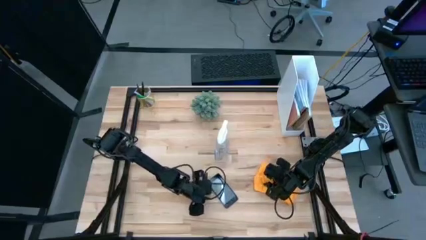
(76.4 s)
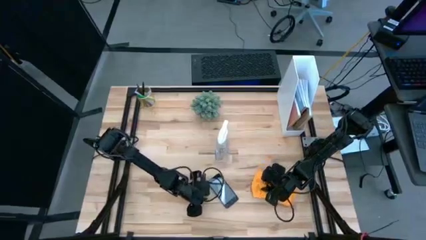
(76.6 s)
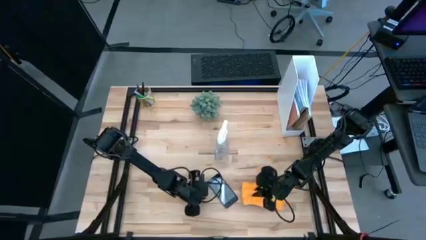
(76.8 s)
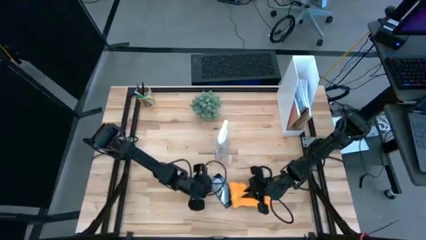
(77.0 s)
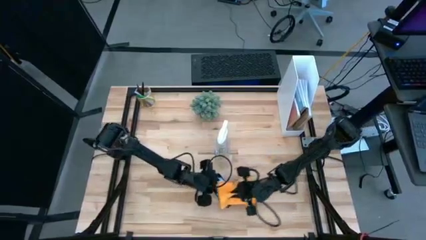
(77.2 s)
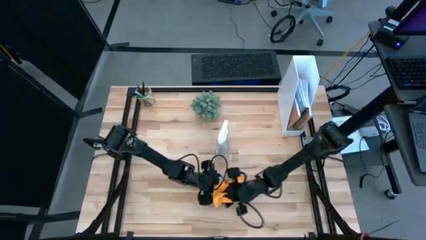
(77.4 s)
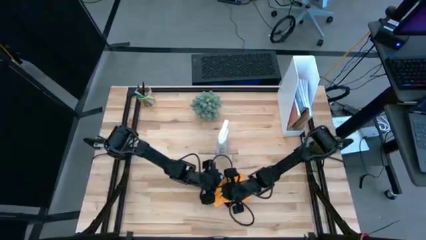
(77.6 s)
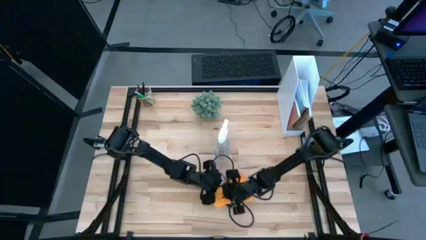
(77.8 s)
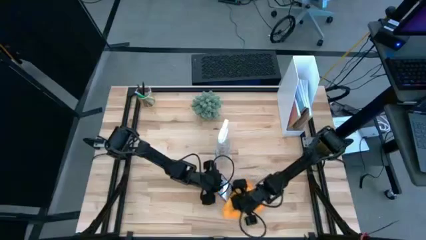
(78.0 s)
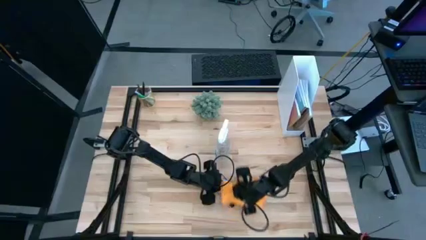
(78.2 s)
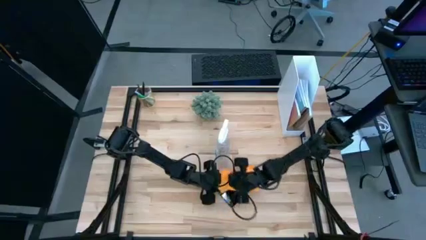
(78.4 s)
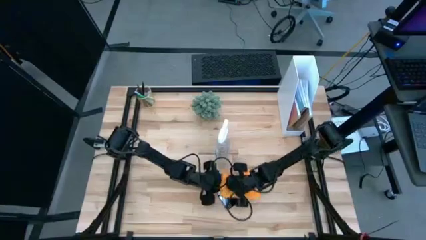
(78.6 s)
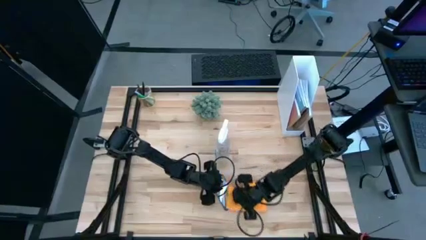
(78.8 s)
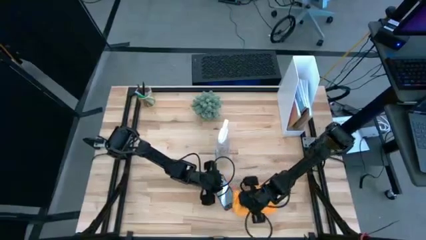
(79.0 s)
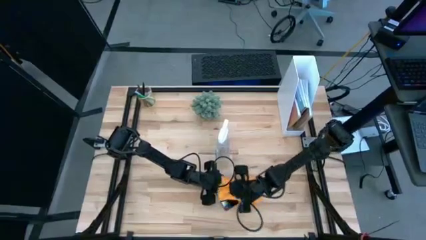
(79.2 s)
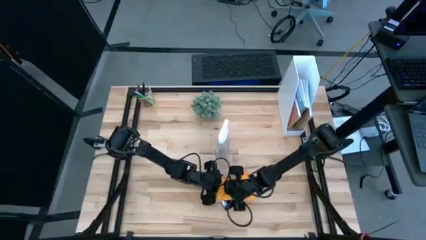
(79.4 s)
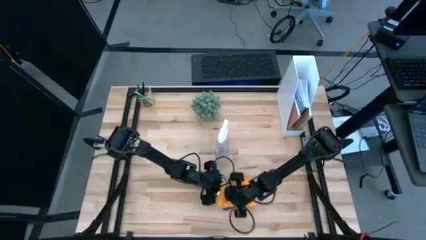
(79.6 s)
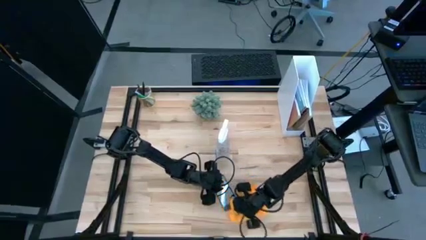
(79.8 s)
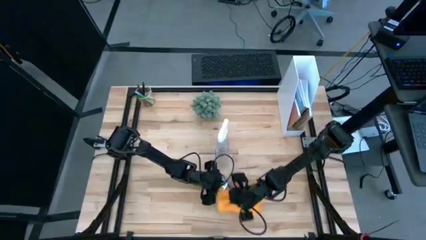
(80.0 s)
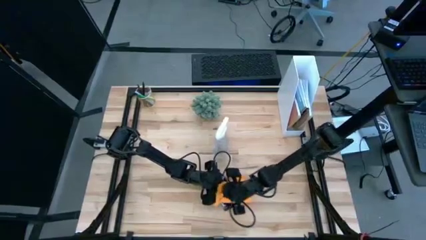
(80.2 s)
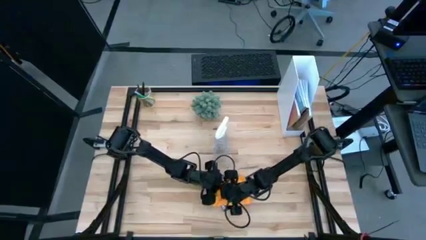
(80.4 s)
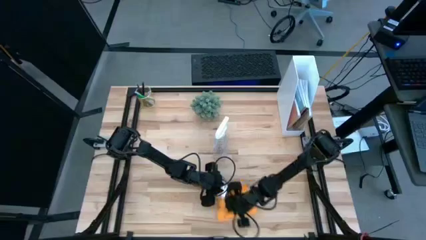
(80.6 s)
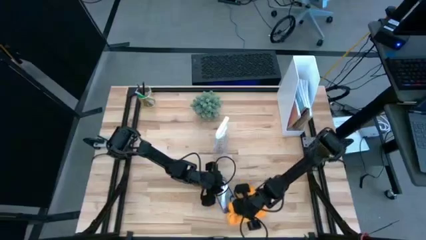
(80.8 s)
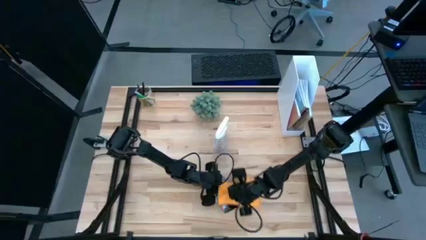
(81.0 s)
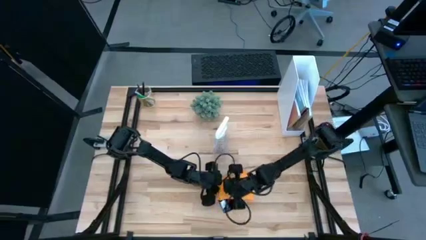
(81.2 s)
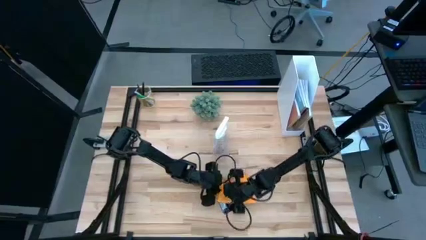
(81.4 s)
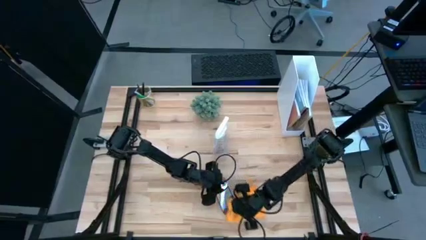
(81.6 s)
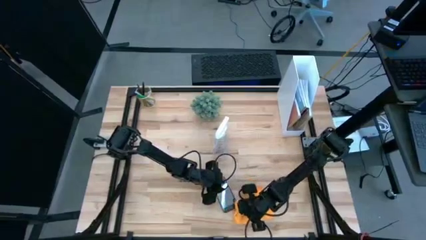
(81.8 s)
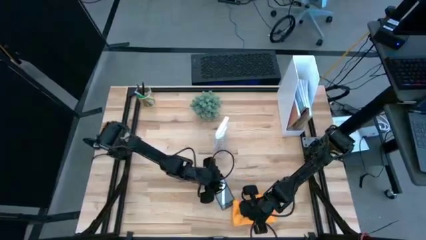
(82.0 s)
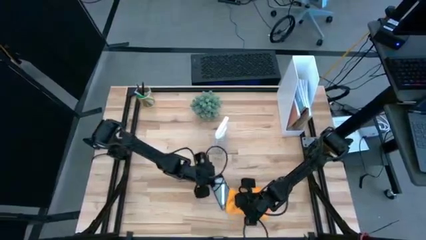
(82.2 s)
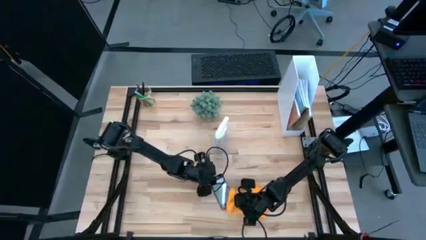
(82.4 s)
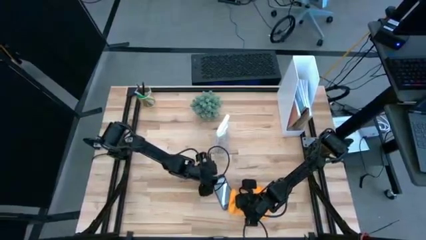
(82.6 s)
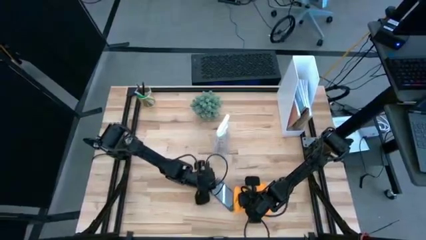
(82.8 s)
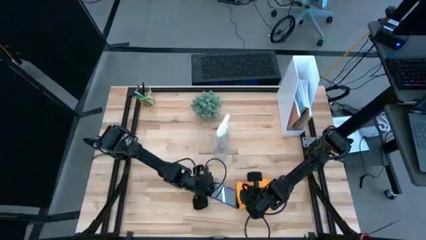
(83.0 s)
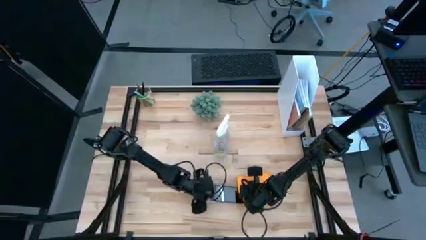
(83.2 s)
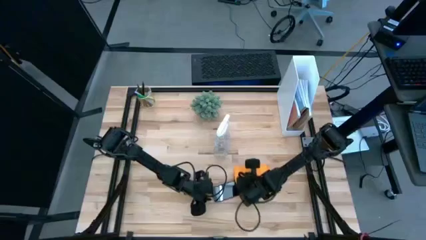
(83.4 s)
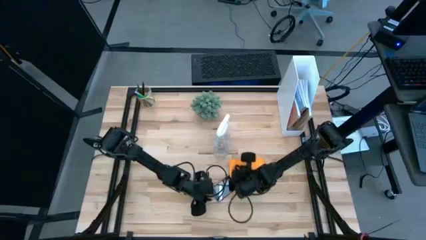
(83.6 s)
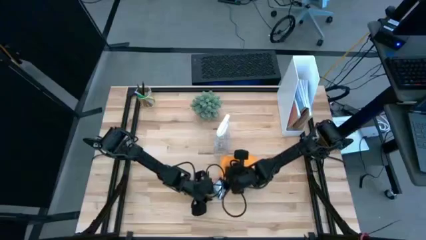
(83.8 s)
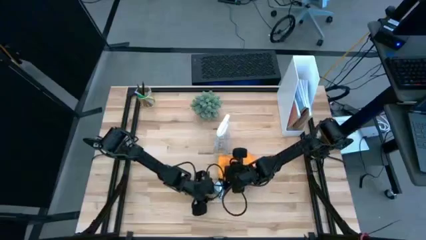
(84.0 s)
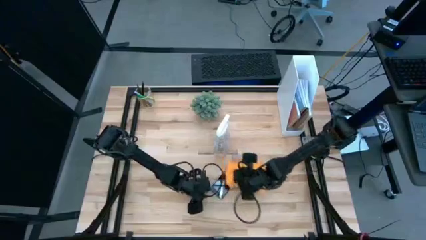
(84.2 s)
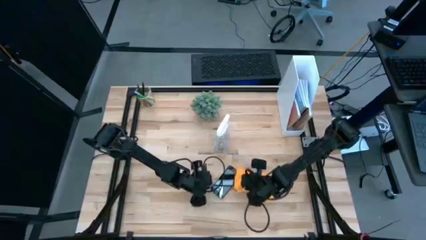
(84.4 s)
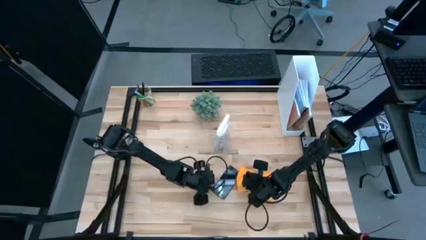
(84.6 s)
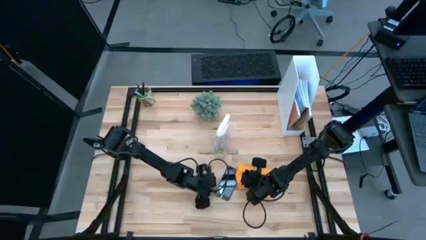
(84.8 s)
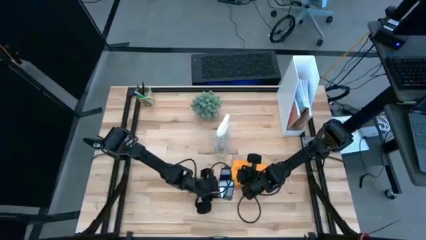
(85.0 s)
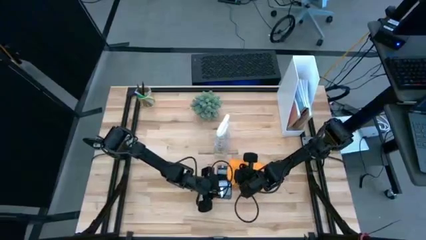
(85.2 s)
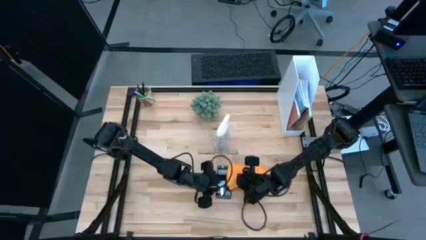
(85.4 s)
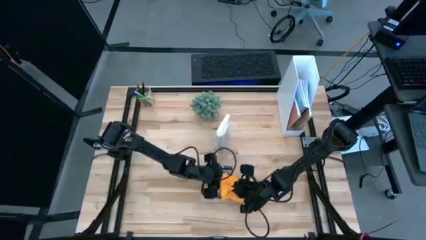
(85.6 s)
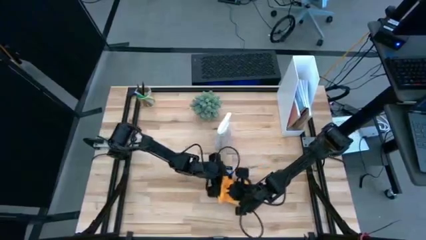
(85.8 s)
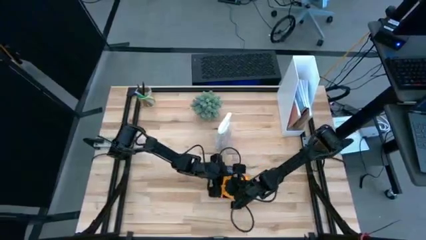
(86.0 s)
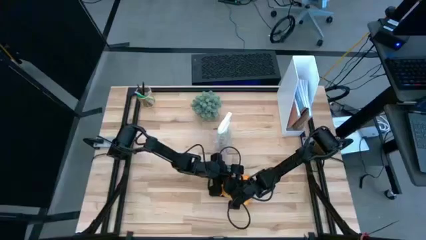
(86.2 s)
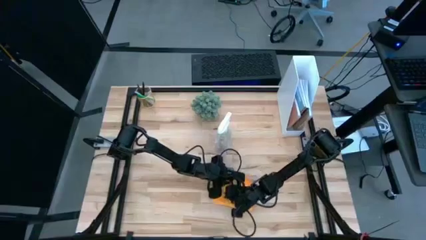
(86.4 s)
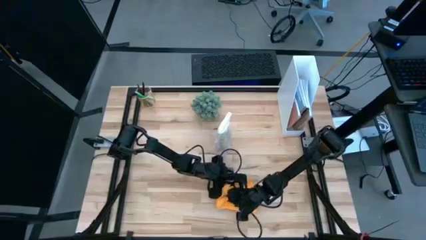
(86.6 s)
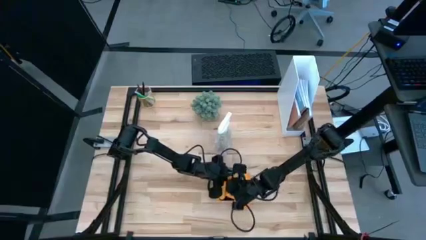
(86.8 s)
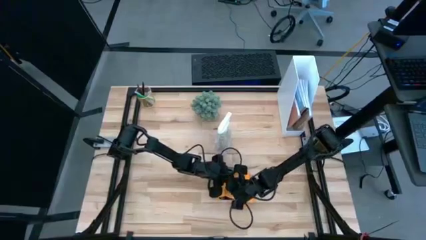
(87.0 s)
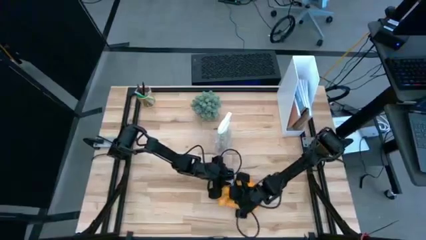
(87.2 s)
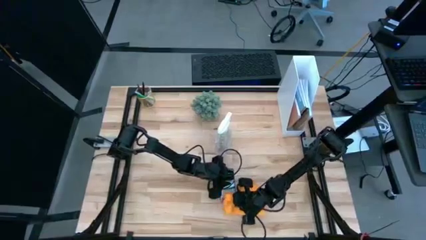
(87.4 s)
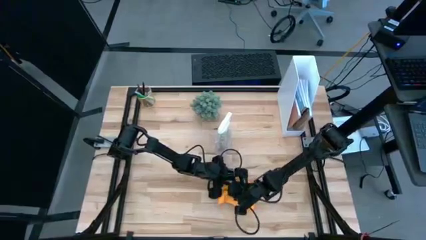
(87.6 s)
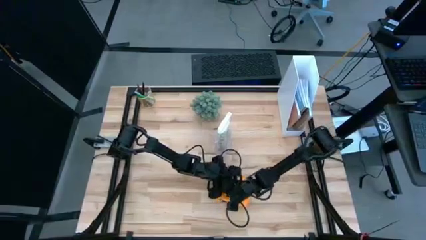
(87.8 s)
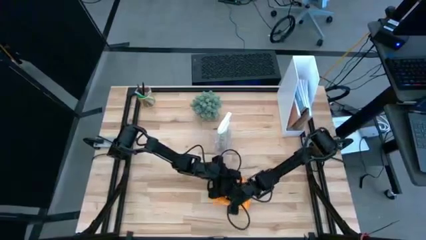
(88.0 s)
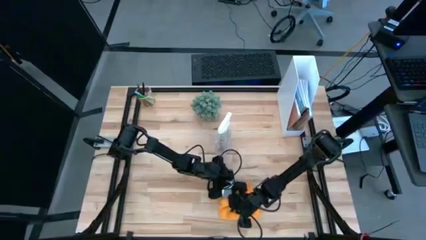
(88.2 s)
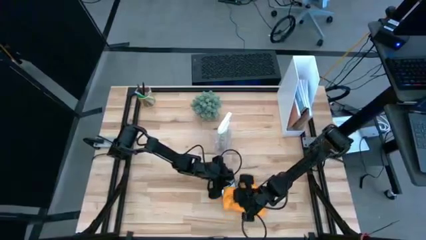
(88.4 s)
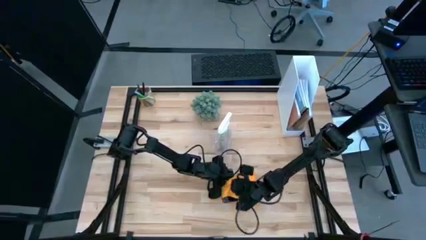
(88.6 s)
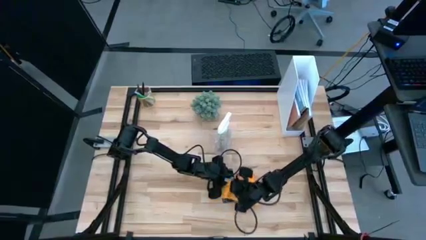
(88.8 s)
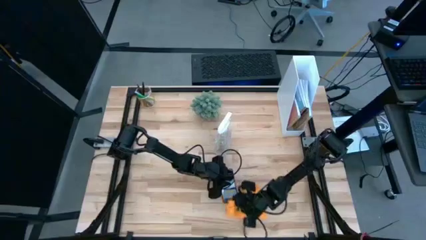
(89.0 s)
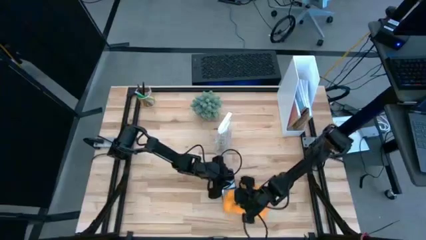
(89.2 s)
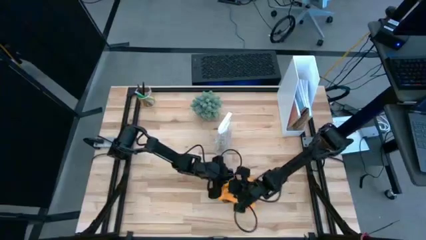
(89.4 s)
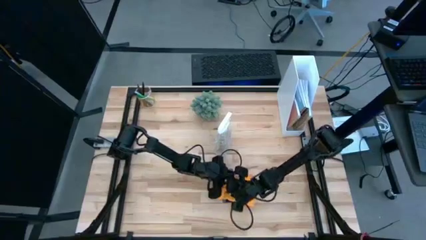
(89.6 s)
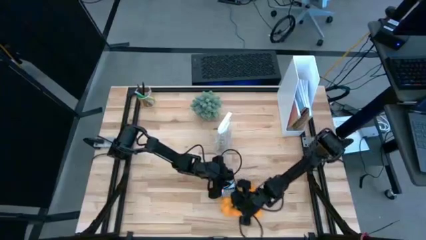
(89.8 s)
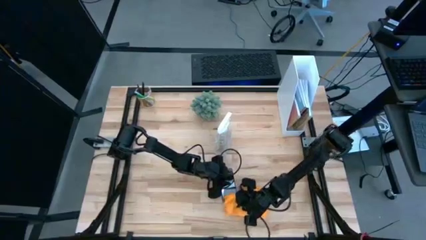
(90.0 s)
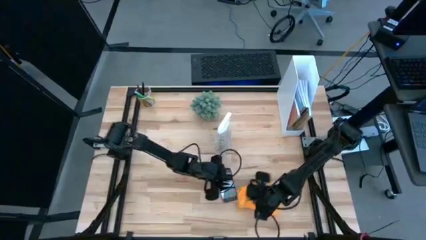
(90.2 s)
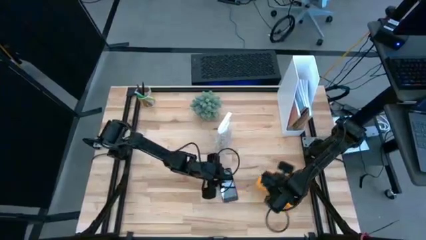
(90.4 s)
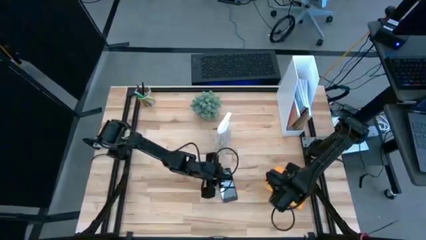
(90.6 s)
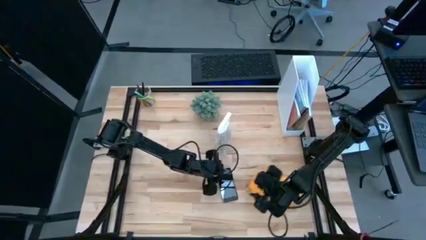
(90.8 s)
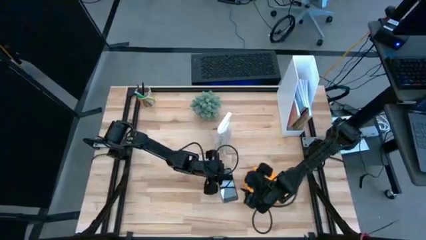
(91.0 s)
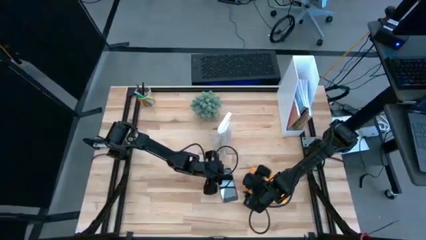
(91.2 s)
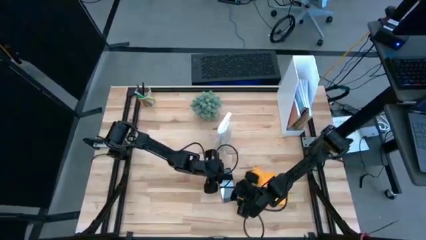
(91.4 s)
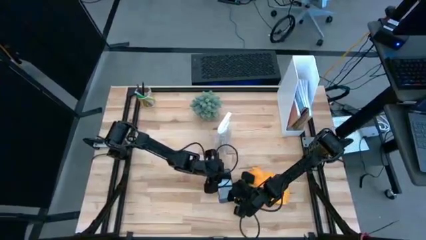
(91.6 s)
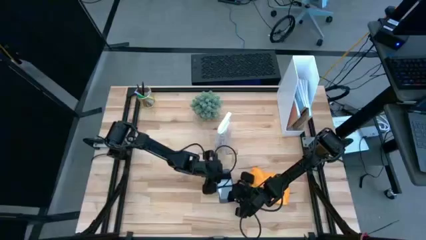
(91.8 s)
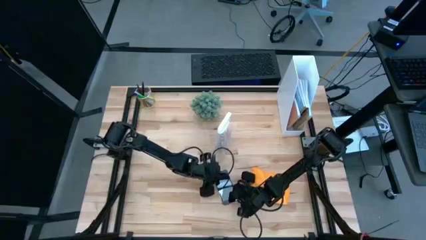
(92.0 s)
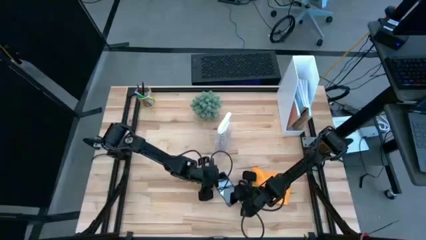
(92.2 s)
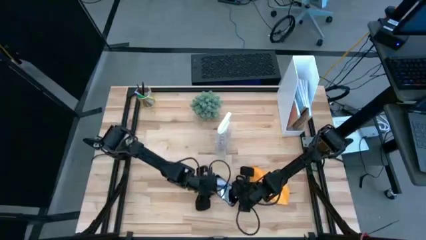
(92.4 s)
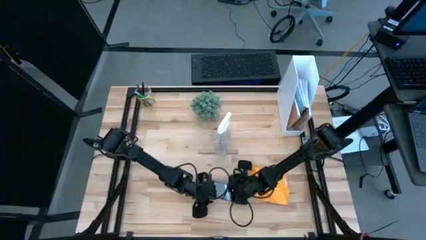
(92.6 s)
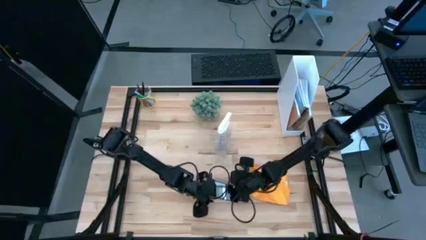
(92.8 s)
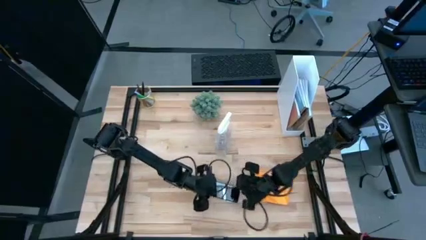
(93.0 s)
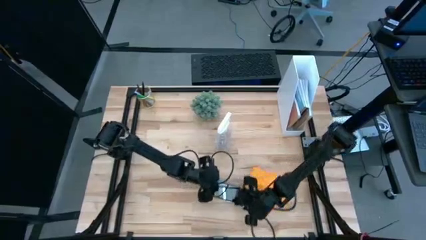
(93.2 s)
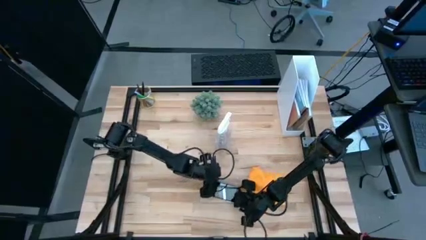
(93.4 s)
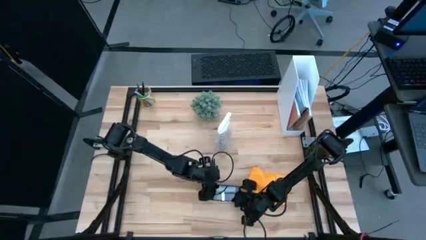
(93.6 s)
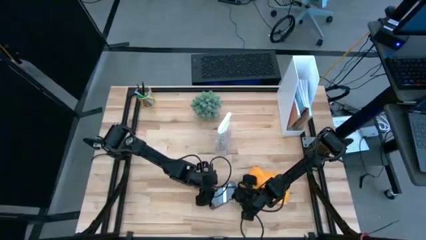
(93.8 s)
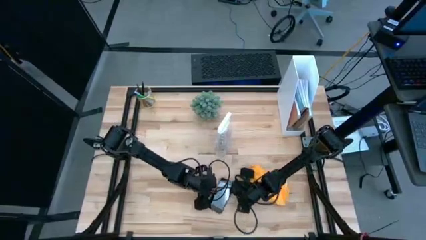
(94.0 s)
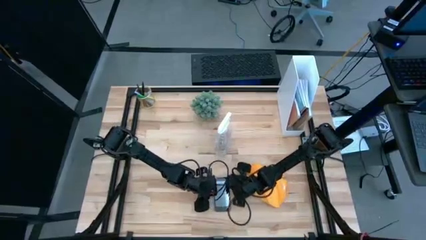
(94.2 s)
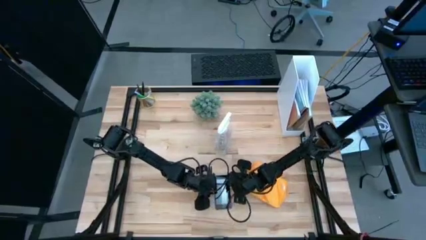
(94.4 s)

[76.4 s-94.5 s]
Task: Apply microfiber cloth
Wipe the cellphone with the microfiber cloth
